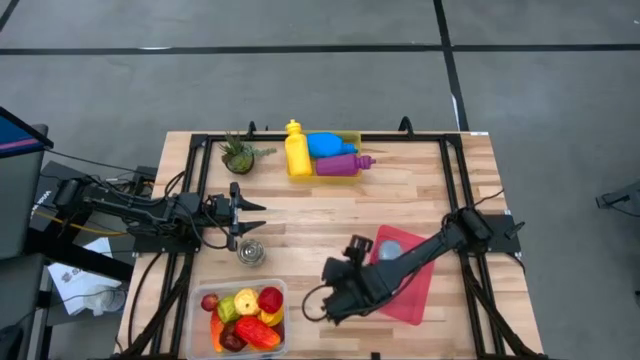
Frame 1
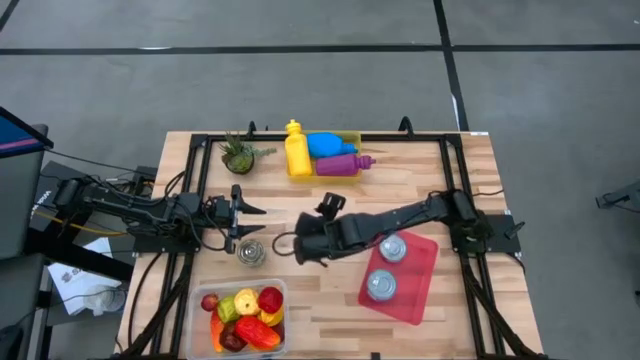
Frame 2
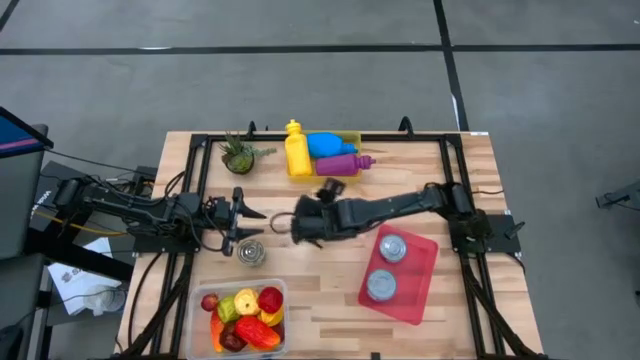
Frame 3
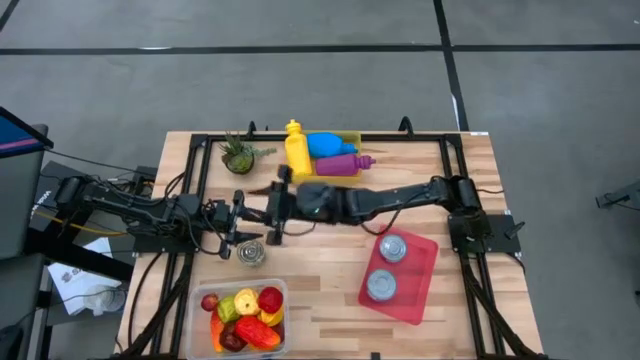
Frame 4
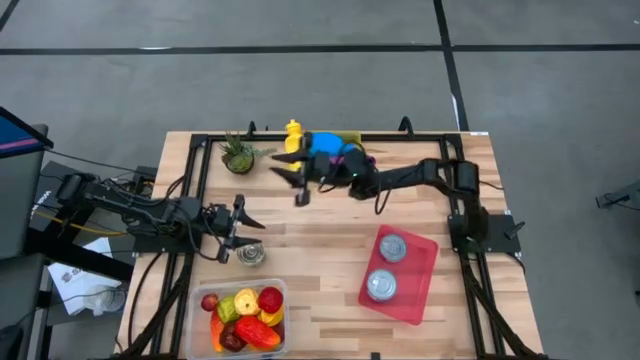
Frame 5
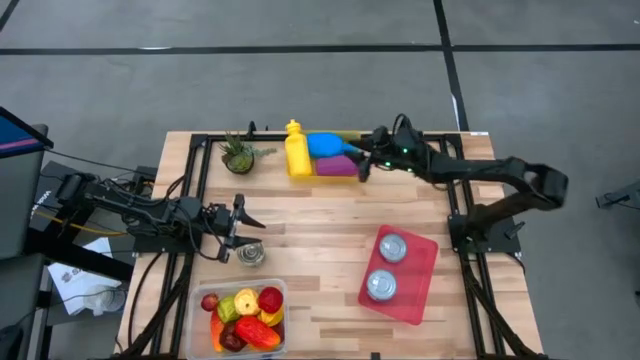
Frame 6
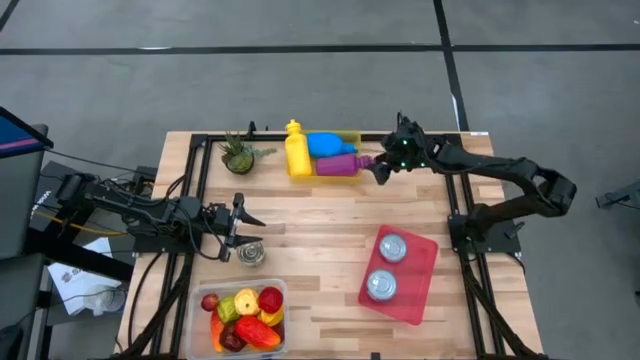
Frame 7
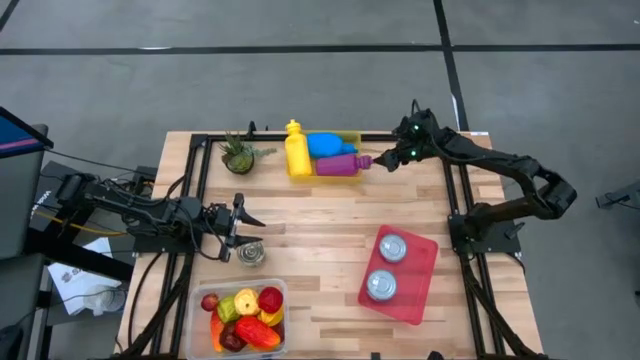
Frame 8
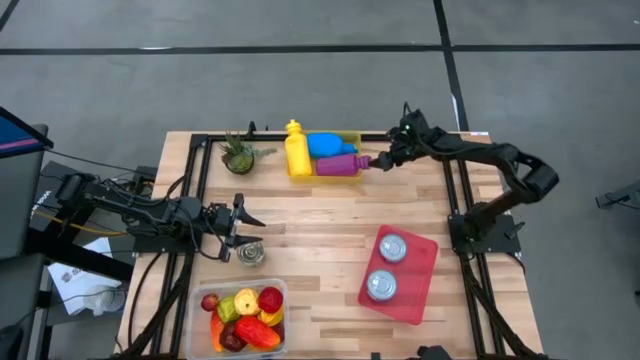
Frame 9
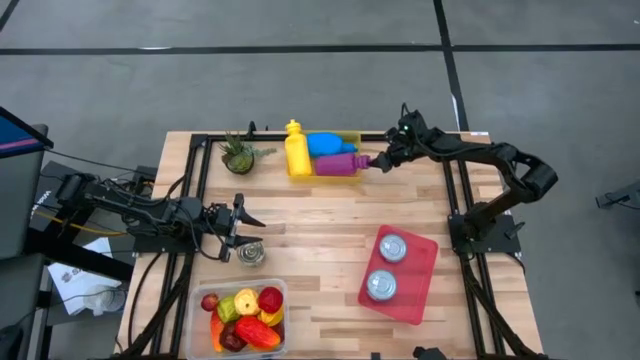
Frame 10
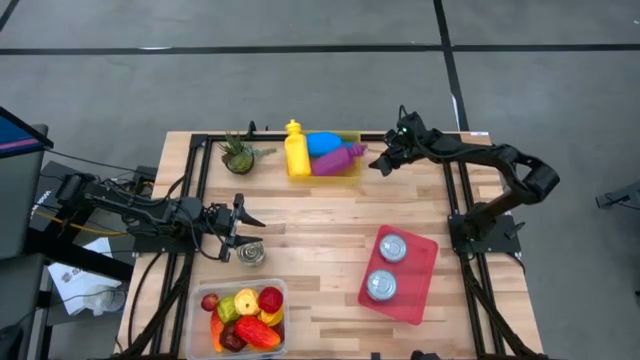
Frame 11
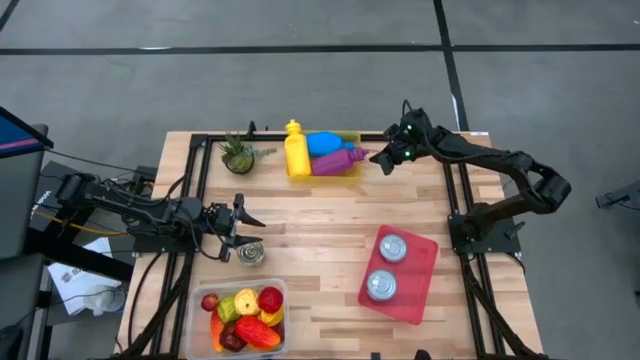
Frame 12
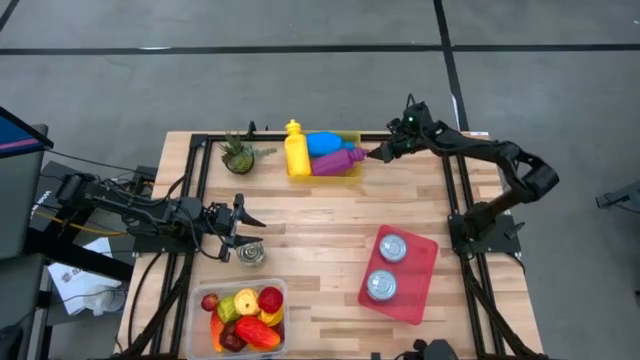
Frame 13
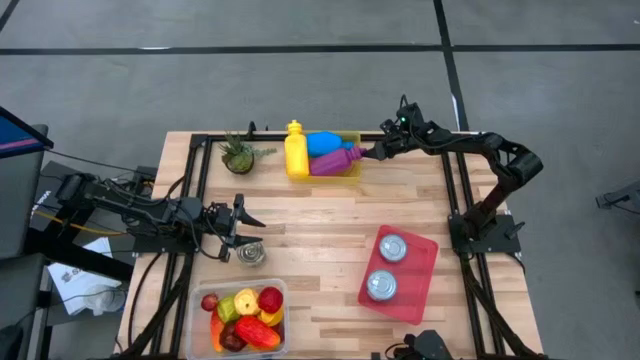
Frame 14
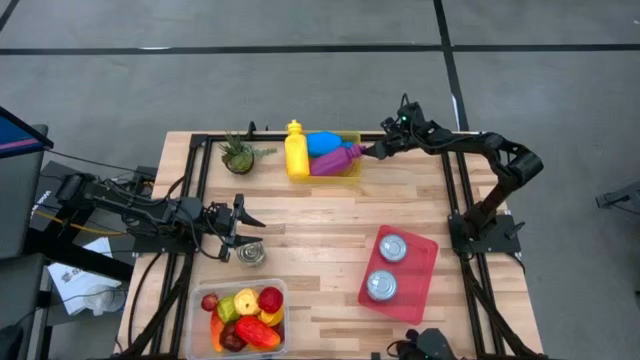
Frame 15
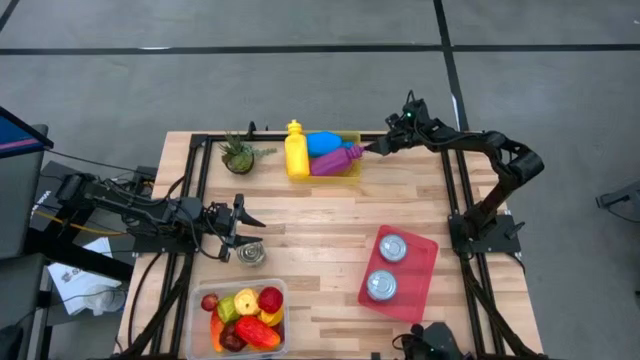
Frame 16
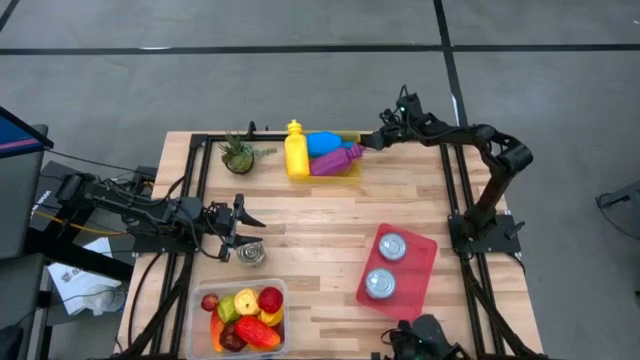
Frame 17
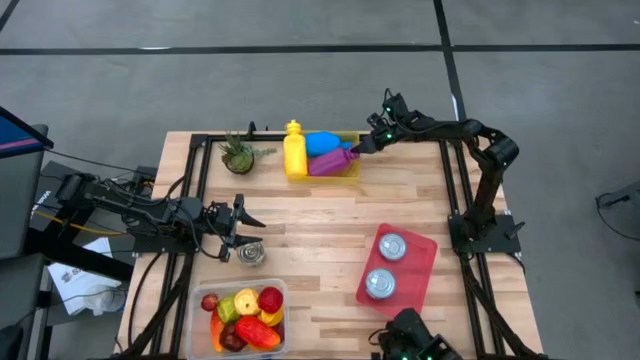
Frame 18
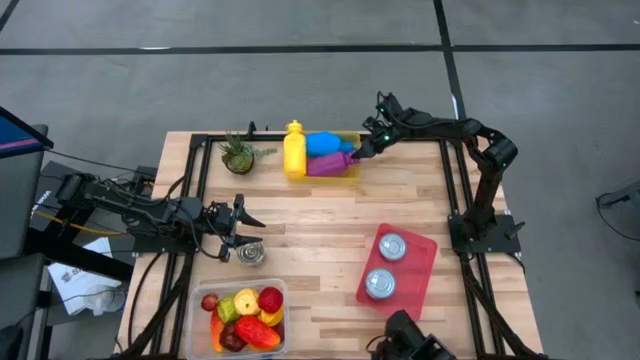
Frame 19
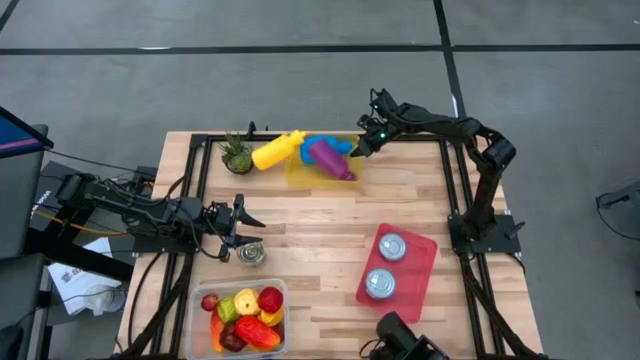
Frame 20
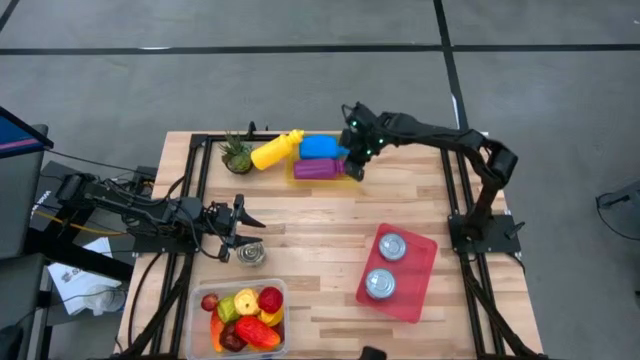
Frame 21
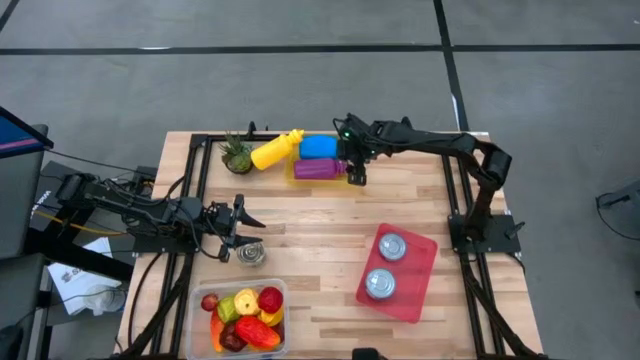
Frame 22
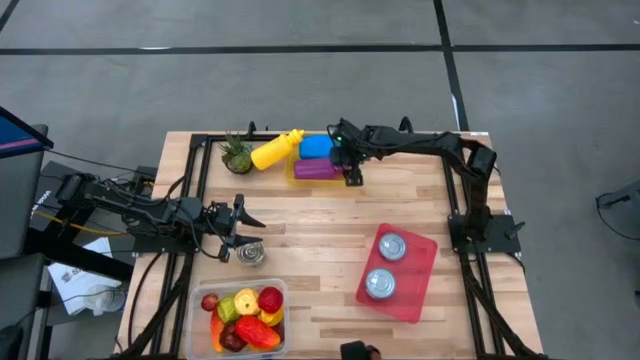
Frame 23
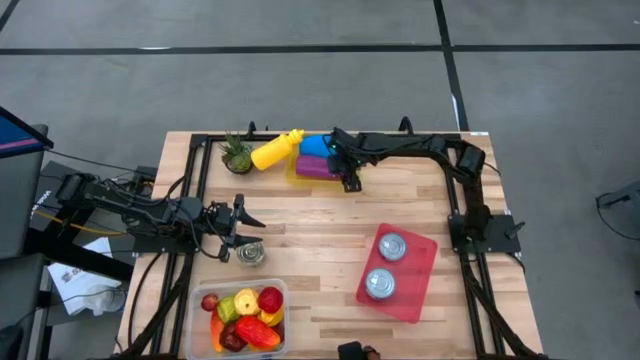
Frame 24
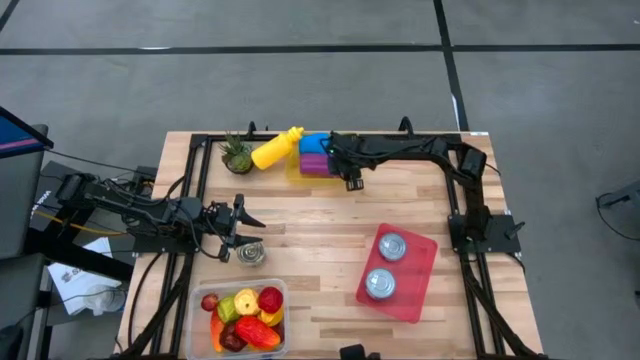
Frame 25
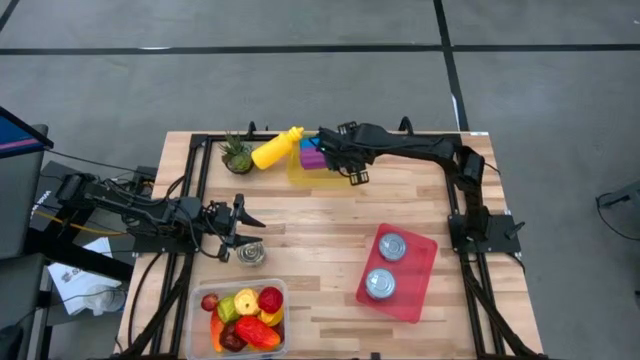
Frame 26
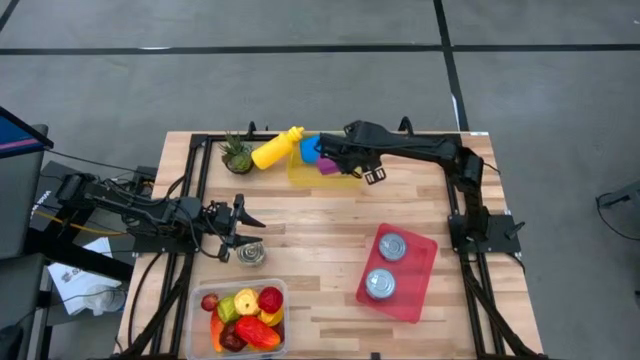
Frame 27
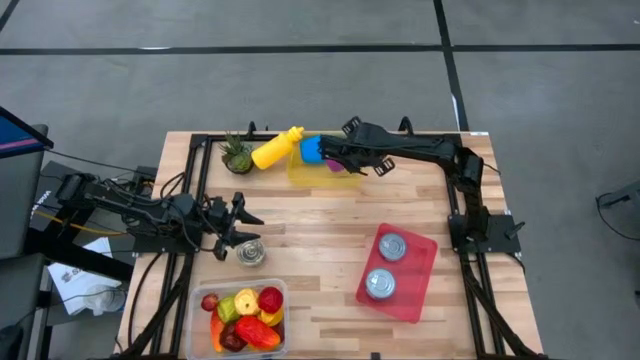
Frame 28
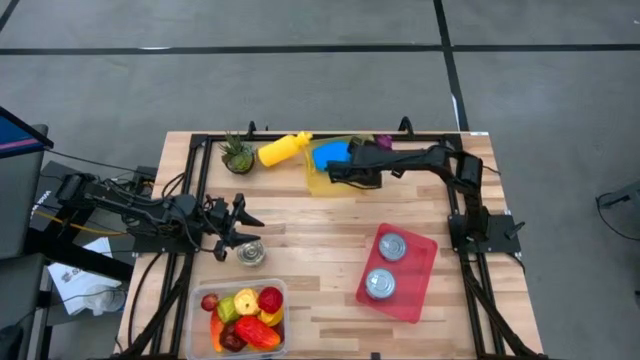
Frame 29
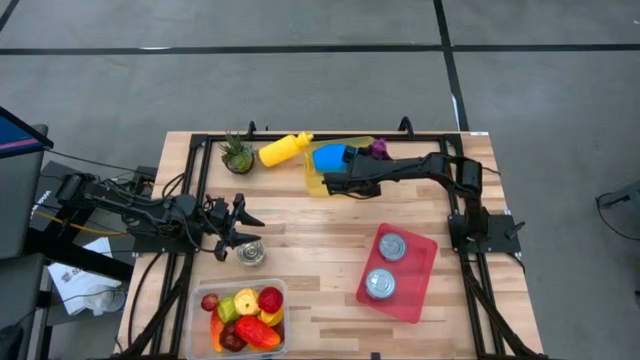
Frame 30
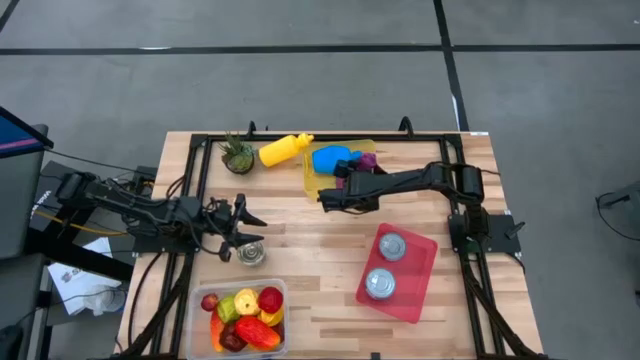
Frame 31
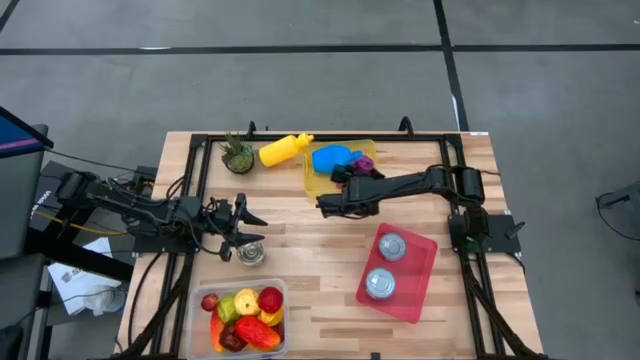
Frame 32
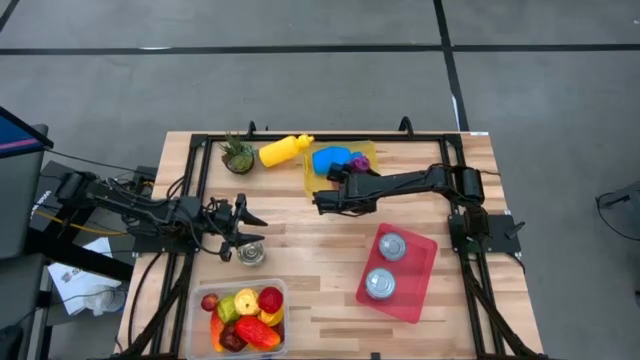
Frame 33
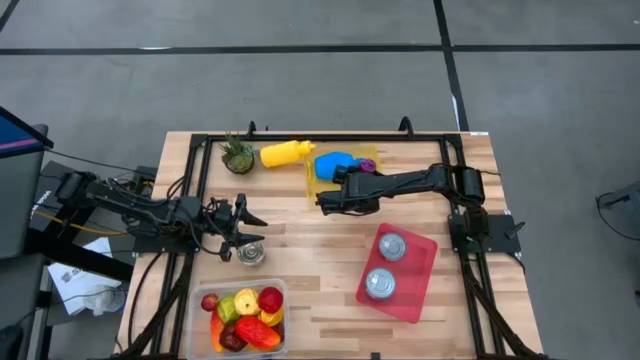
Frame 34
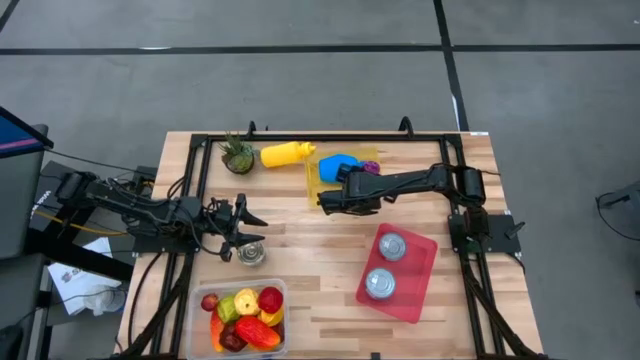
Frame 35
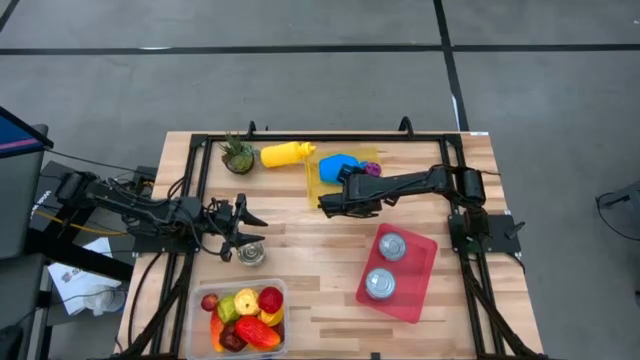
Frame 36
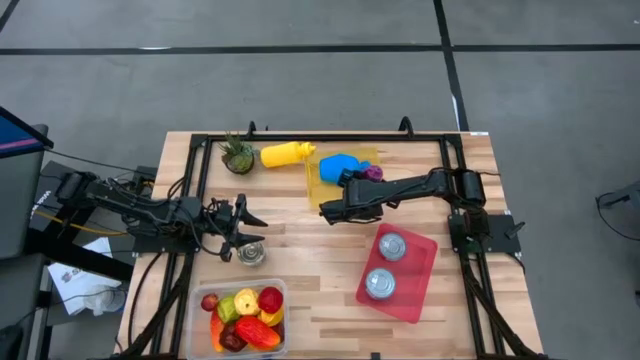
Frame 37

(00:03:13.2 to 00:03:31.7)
Task: Pick & Place Food Item
Adjust the purple tumbler in the yellow bin

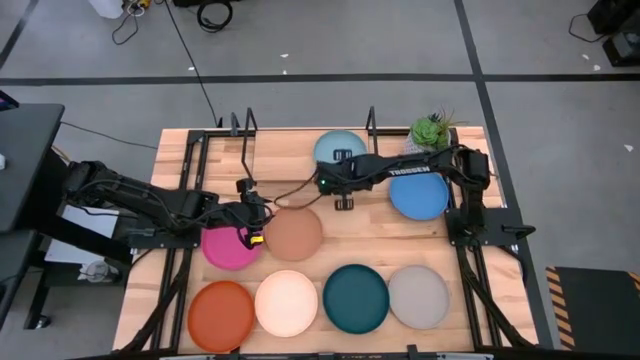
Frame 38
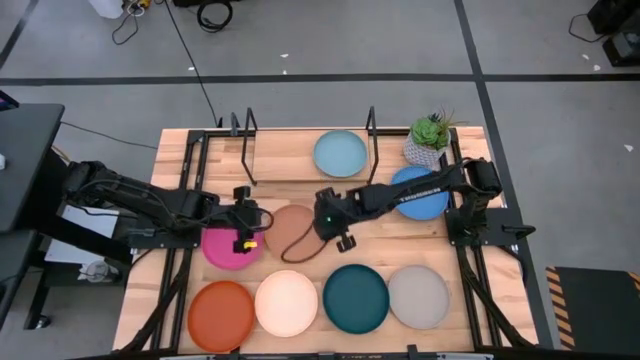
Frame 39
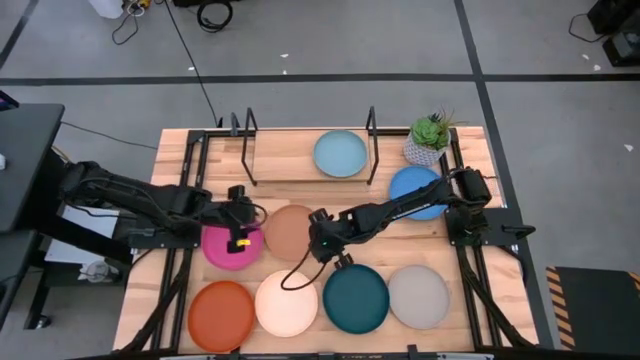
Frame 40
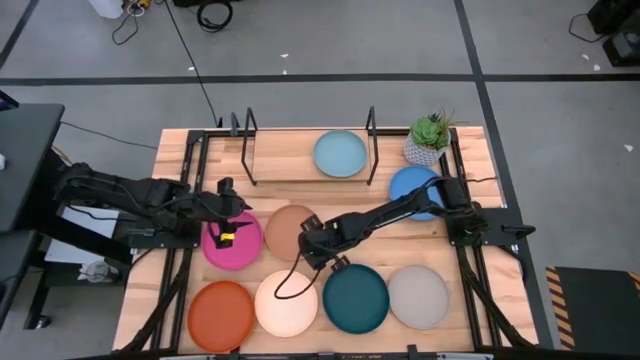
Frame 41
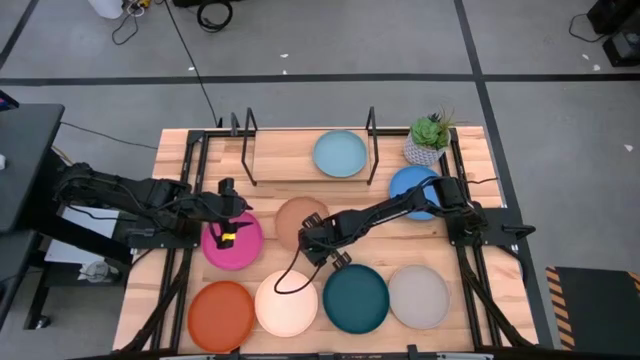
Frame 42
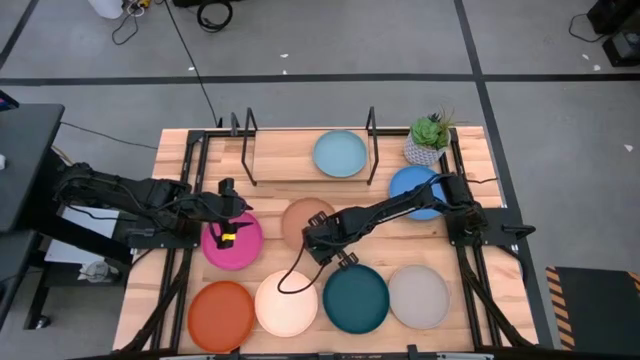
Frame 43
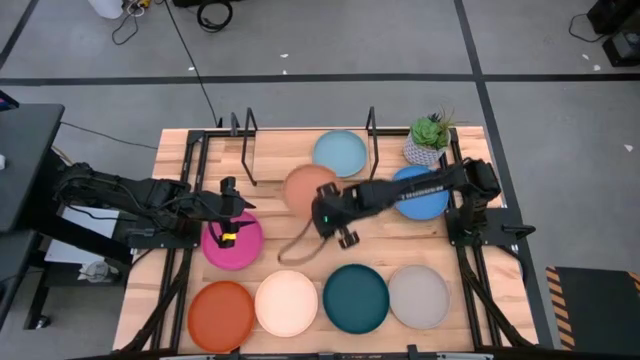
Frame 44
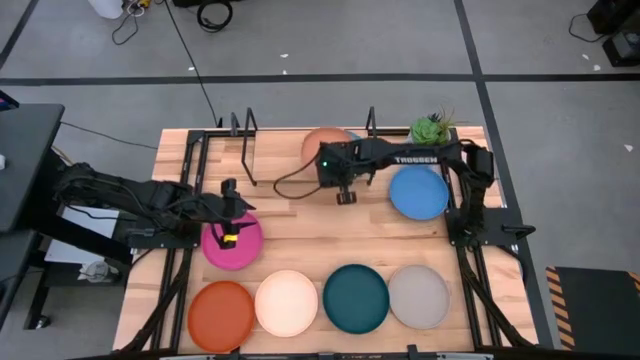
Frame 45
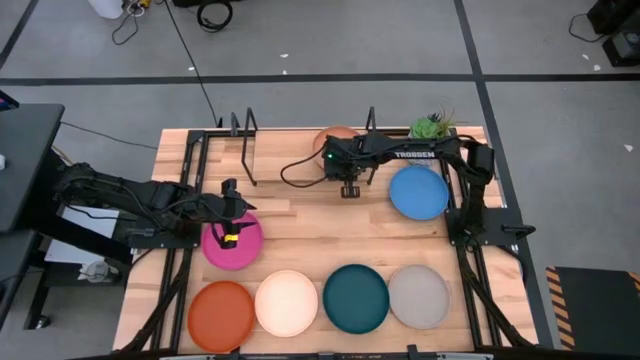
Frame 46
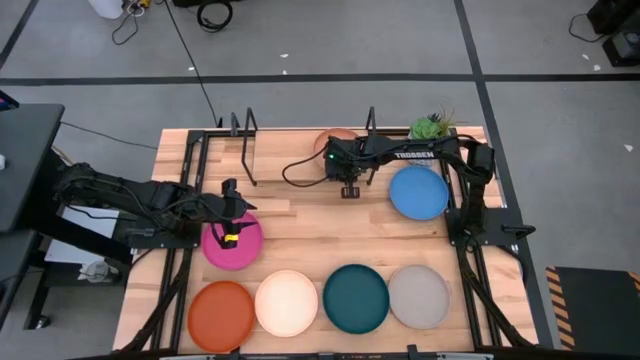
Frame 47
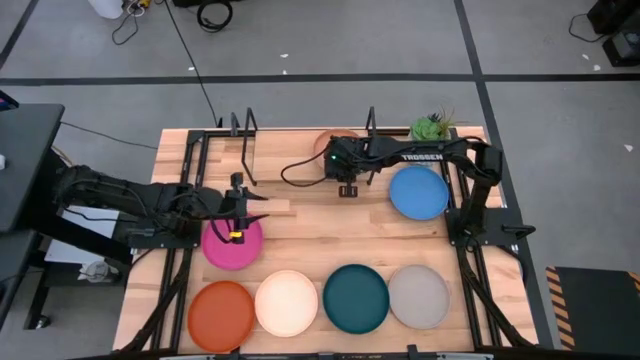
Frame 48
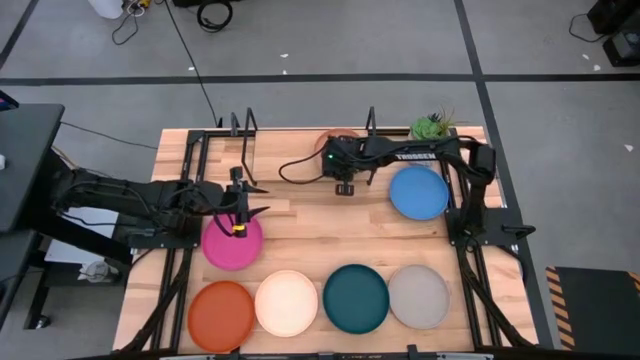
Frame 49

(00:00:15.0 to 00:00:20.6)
Task: Place and stack plates onto a shelf
Stack the brown plate on top of the light blue plate on the shelf
